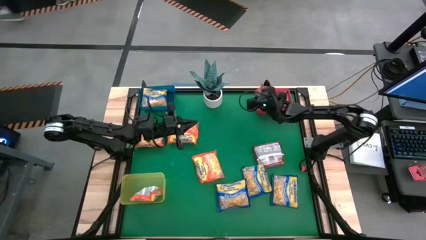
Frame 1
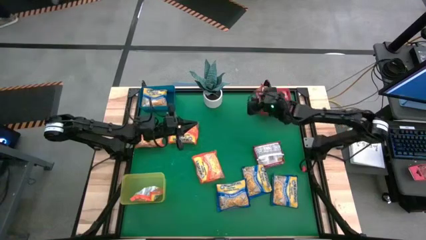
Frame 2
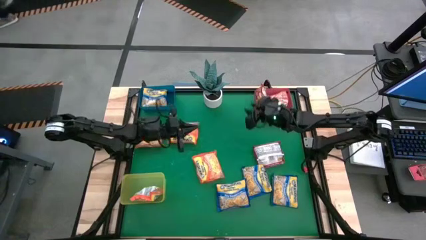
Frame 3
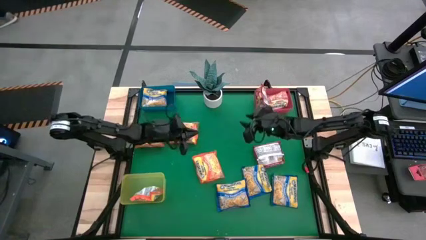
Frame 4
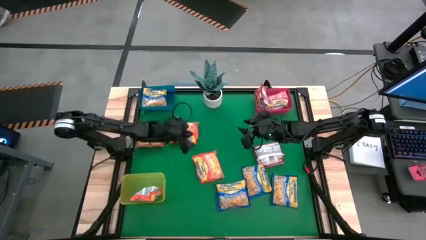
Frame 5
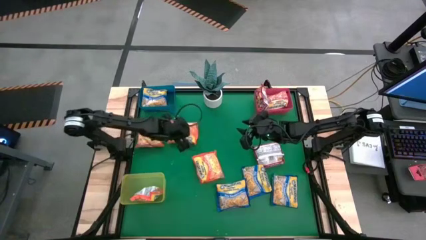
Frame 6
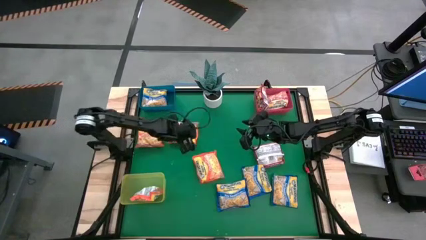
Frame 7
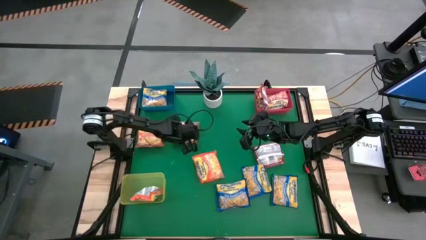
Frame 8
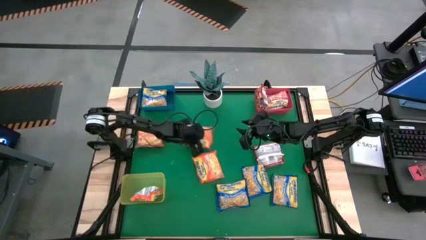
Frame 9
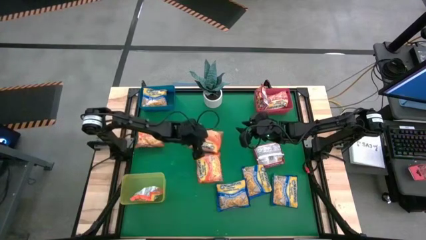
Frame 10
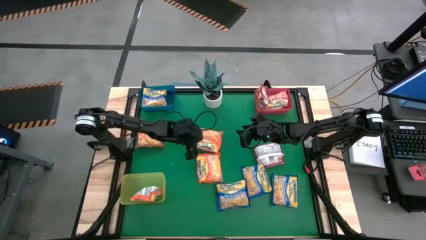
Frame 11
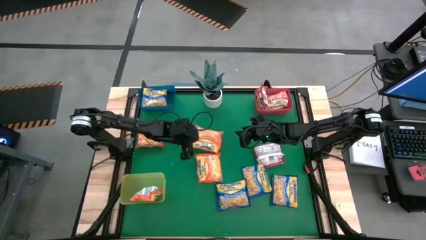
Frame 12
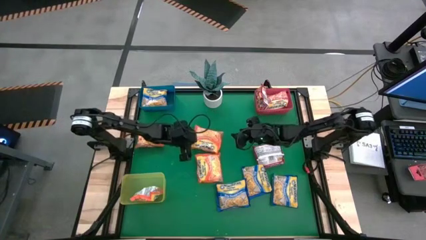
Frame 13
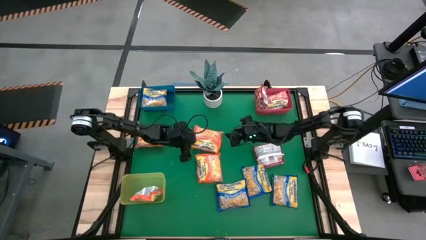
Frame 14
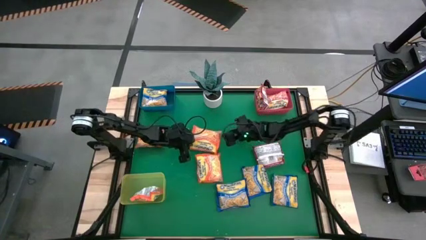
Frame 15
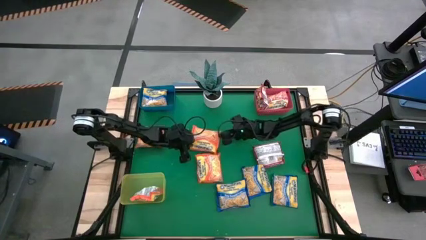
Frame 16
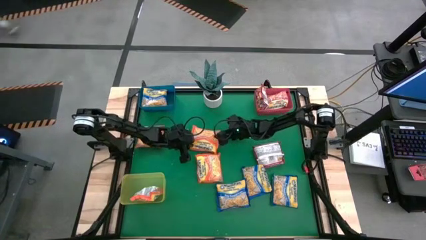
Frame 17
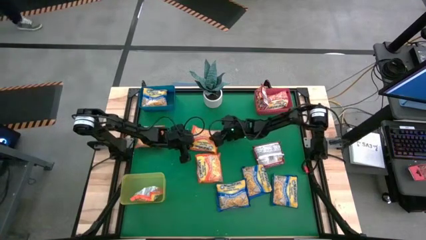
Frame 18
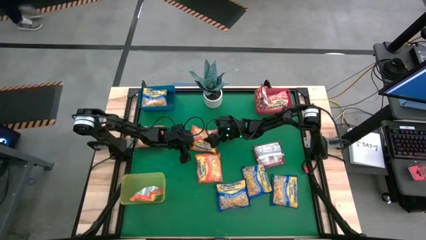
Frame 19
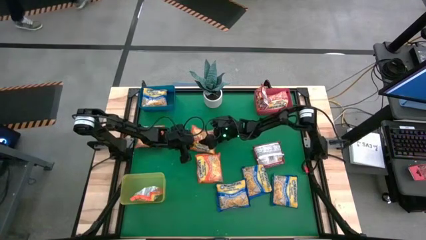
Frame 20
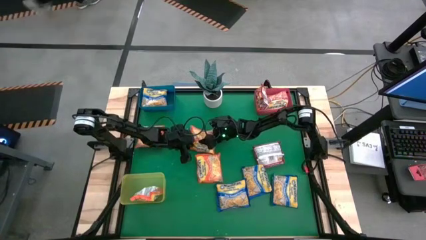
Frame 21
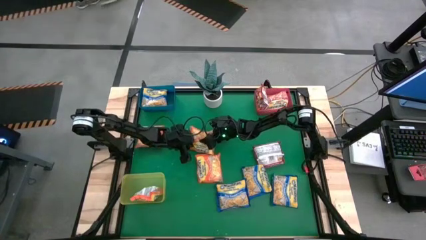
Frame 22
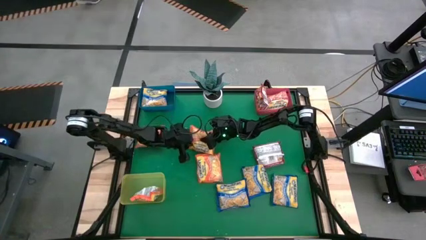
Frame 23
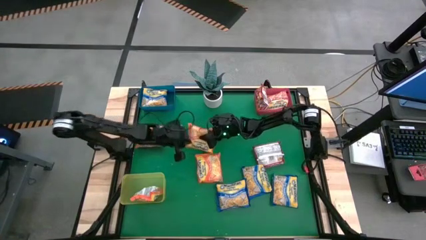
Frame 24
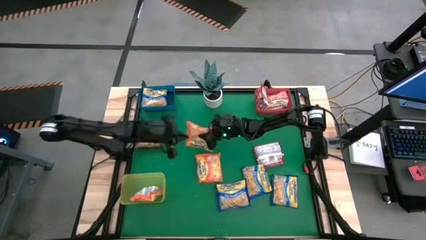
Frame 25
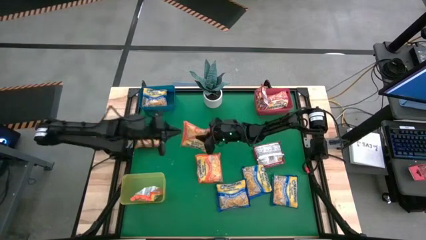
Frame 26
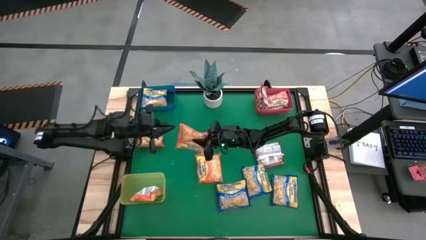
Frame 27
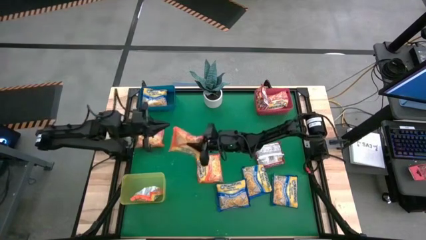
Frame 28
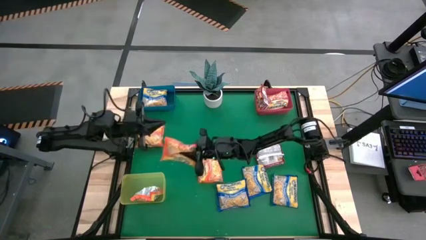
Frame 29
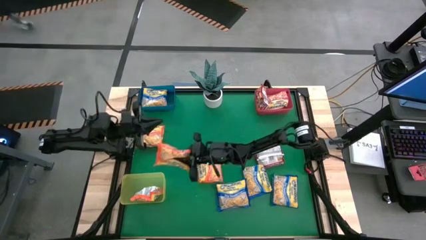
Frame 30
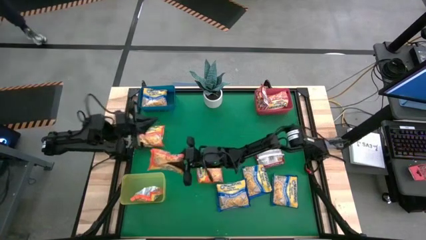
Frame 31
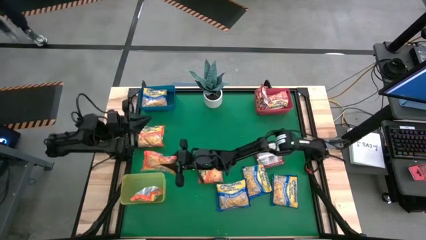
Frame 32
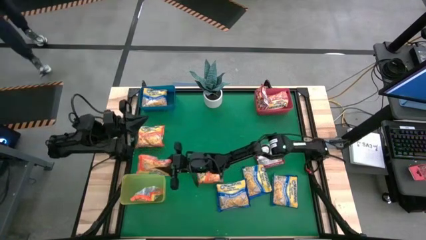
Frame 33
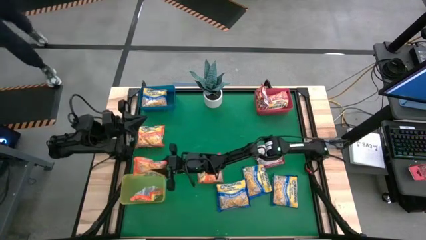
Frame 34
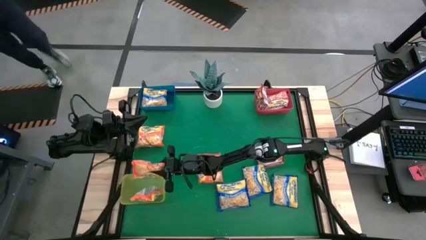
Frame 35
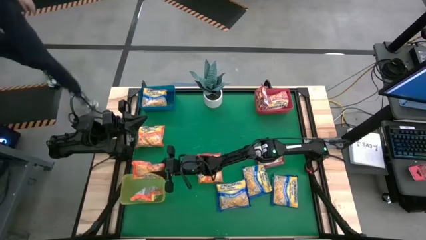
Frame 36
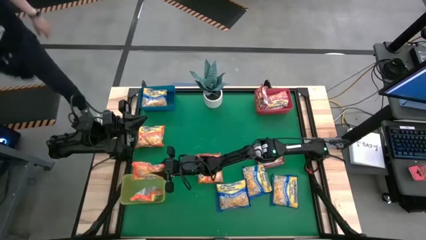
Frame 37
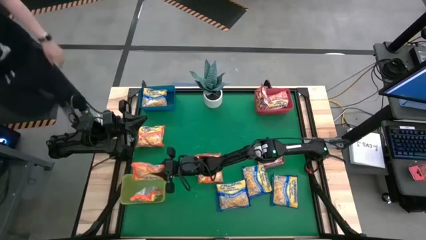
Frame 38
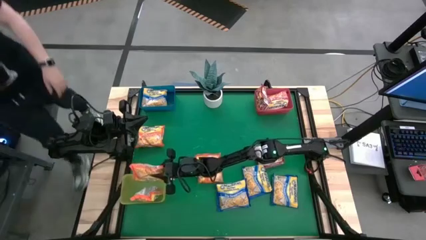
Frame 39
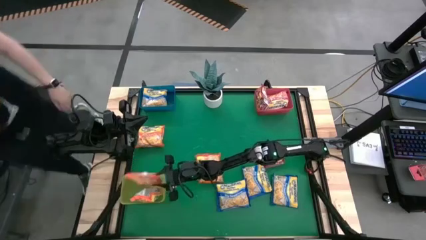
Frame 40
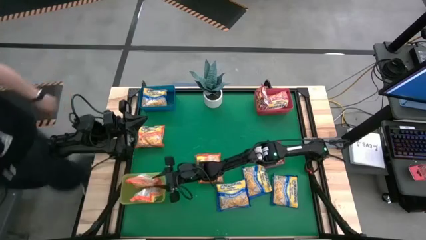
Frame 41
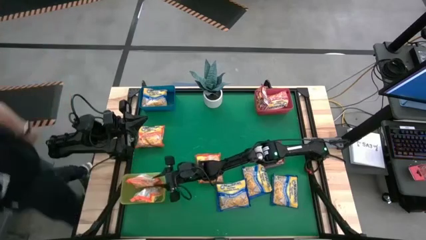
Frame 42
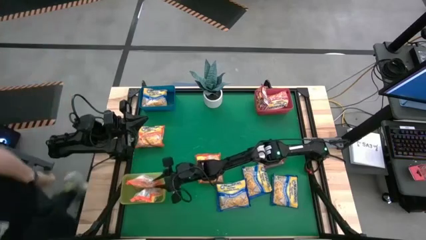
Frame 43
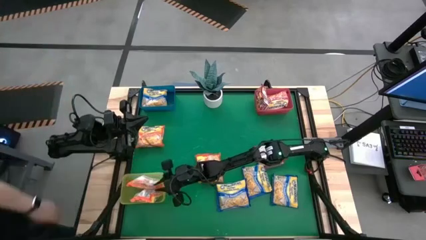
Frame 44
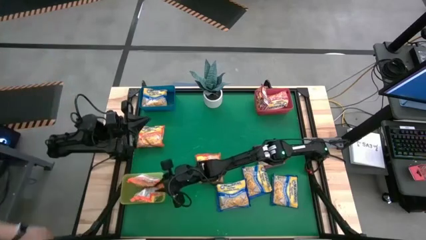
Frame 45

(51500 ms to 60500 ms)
Task: Sort Maruchan noodles
Put the orange noodle pack into the yellow bin
